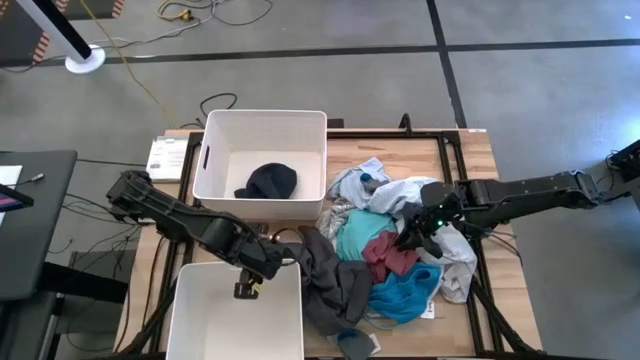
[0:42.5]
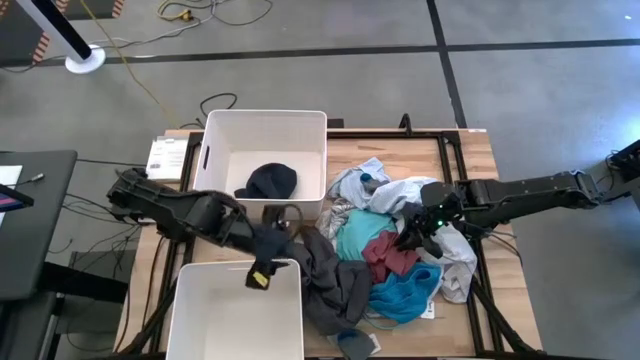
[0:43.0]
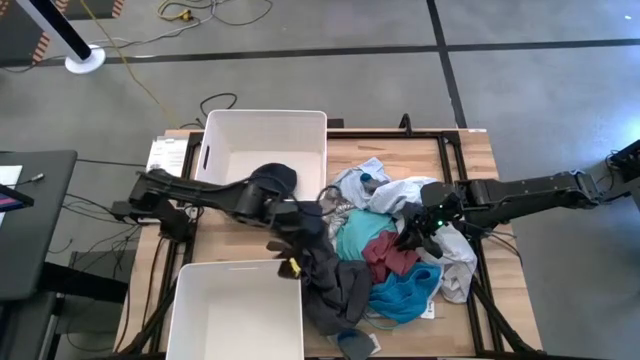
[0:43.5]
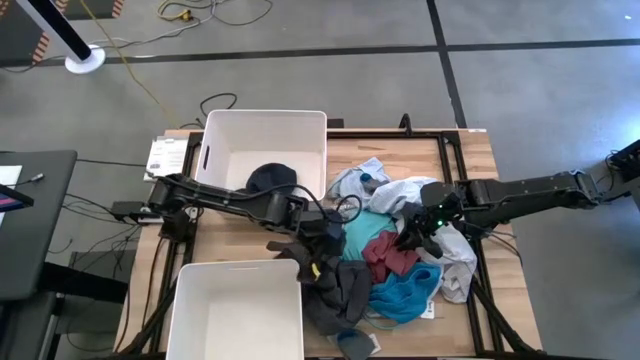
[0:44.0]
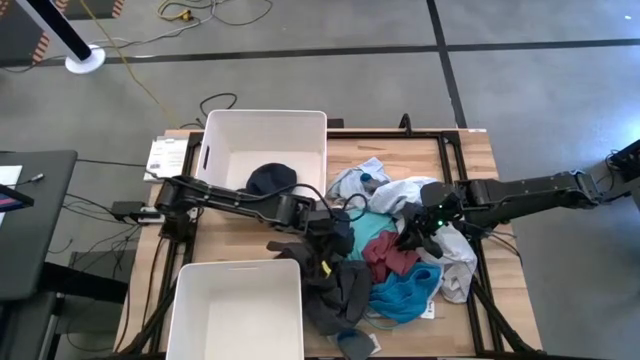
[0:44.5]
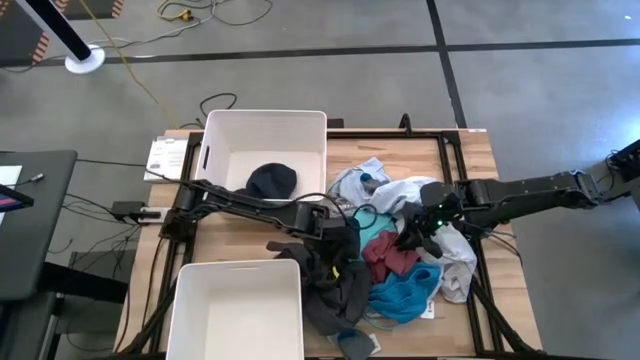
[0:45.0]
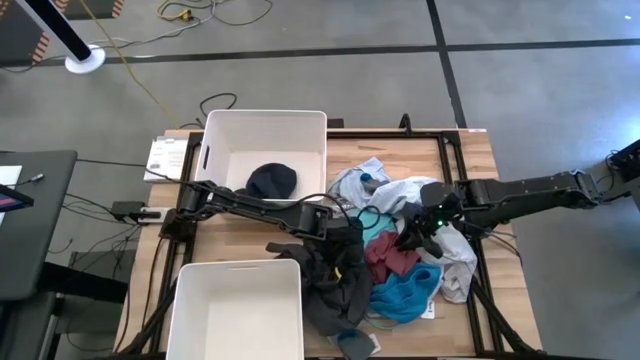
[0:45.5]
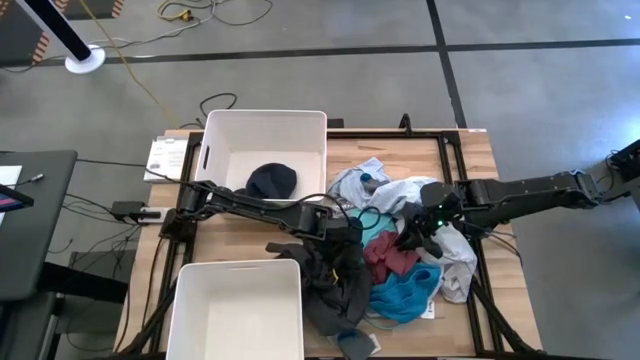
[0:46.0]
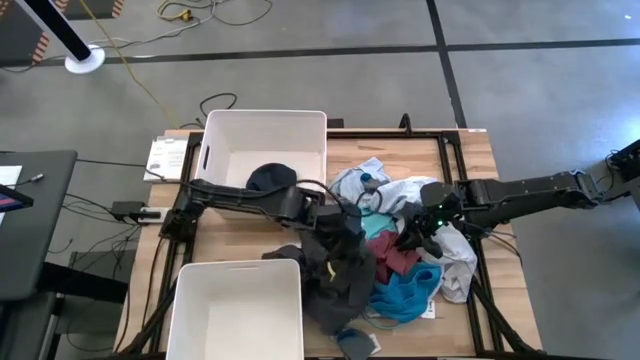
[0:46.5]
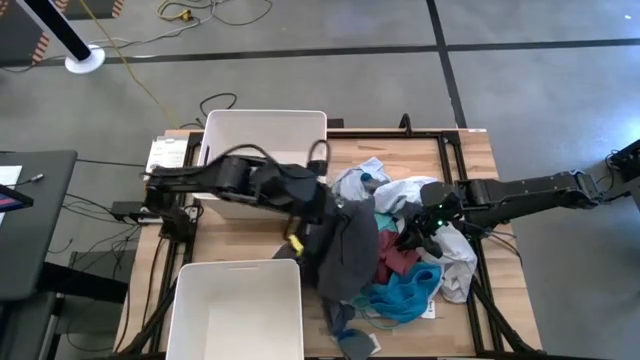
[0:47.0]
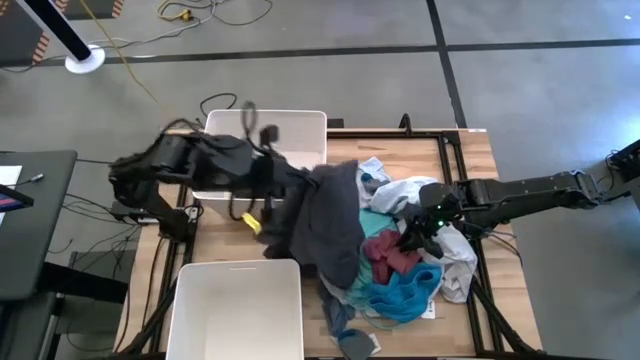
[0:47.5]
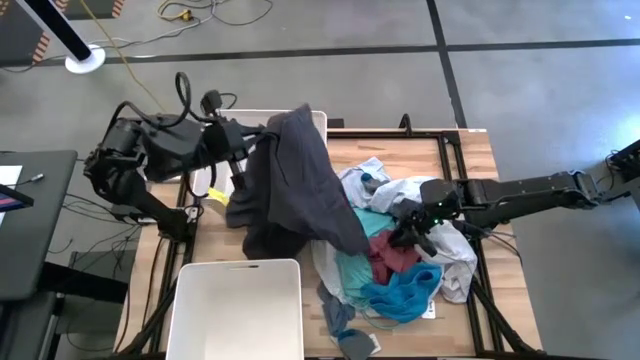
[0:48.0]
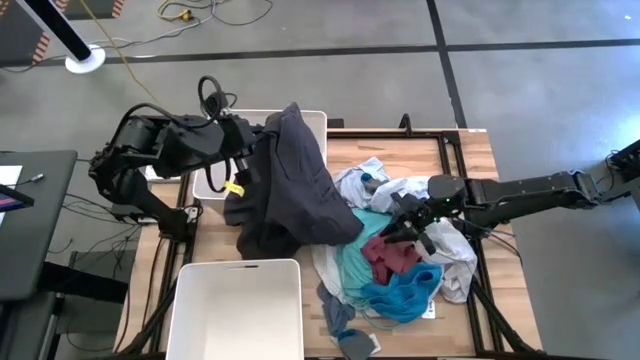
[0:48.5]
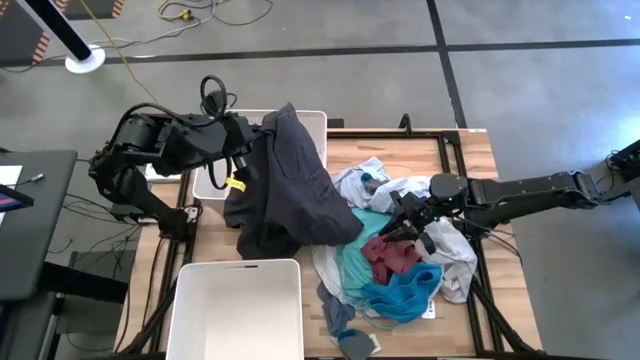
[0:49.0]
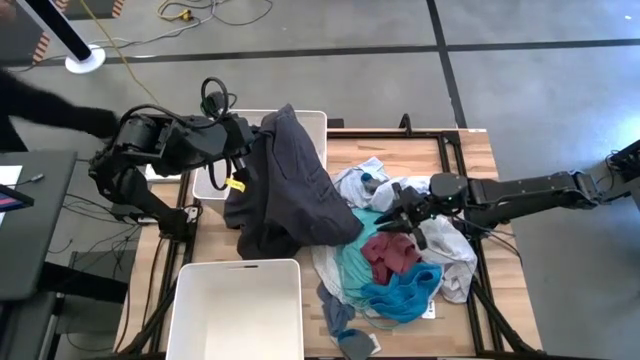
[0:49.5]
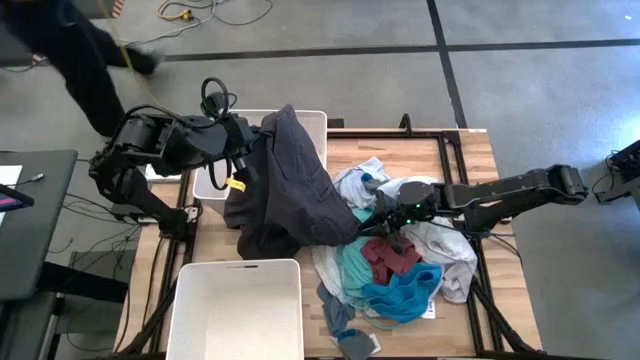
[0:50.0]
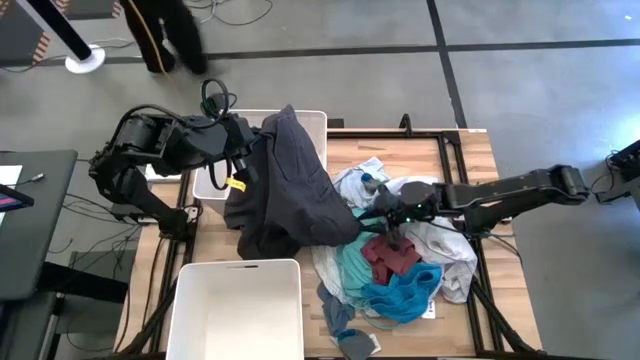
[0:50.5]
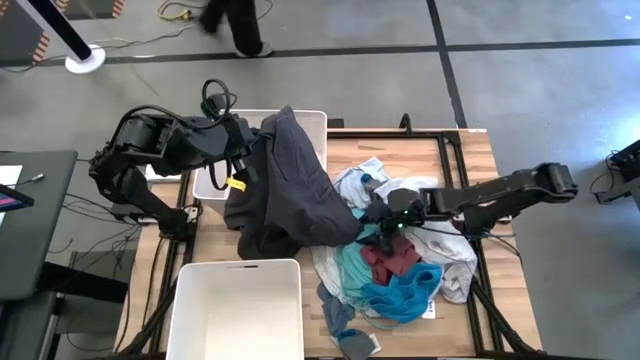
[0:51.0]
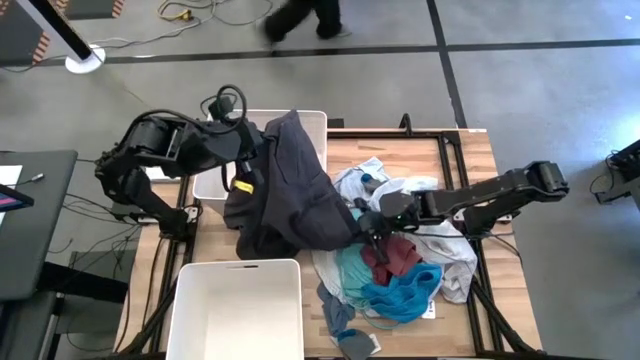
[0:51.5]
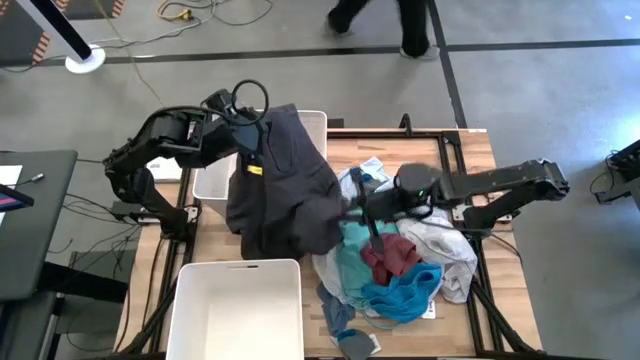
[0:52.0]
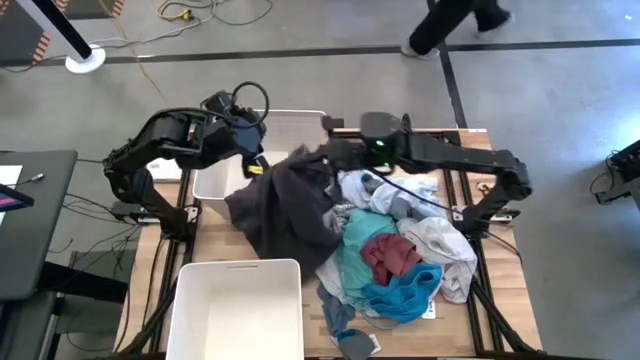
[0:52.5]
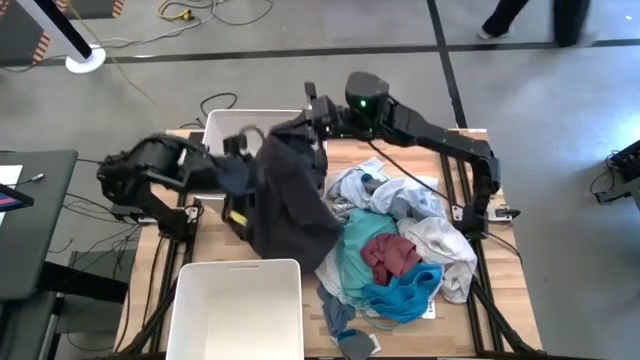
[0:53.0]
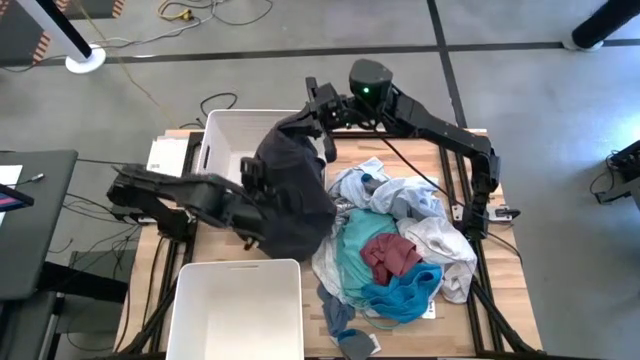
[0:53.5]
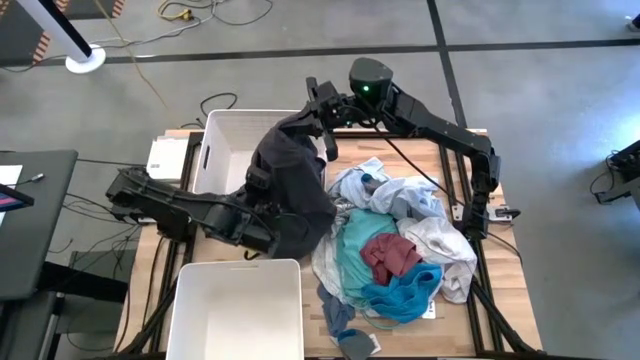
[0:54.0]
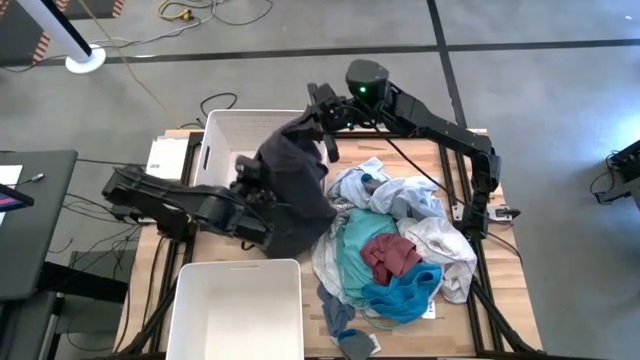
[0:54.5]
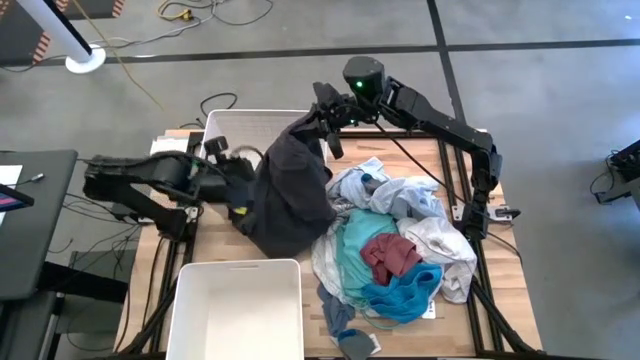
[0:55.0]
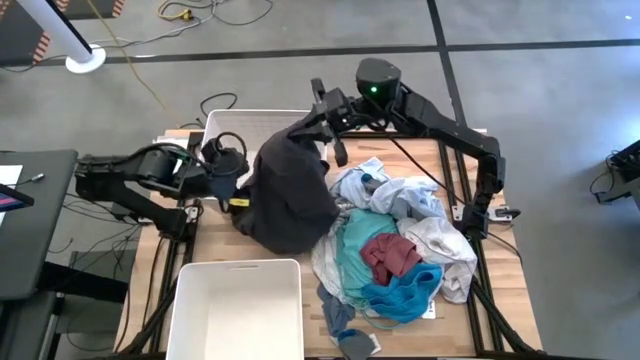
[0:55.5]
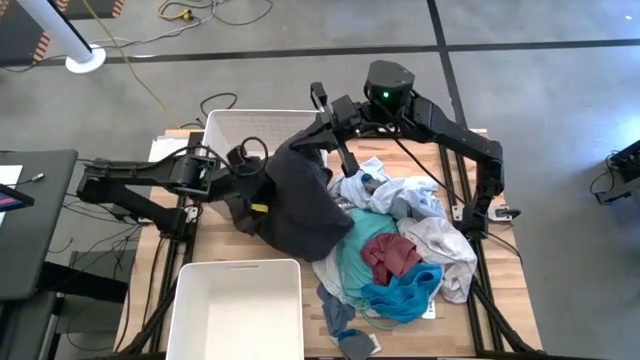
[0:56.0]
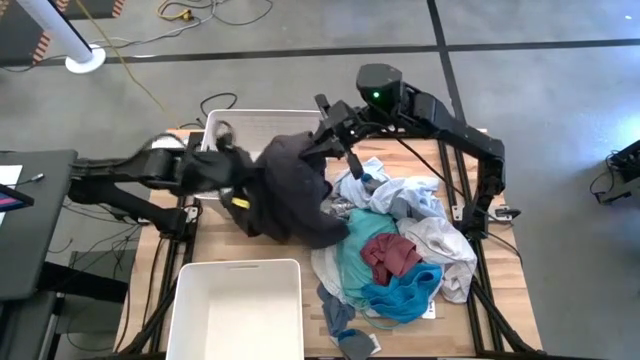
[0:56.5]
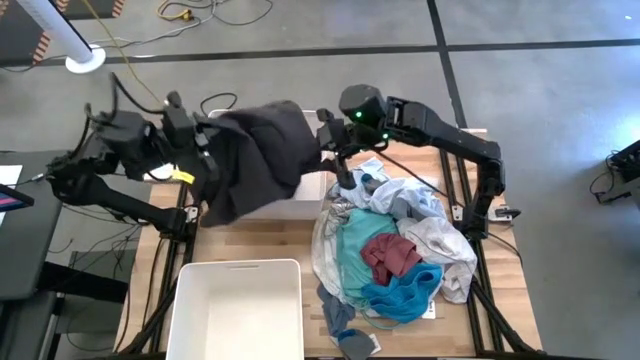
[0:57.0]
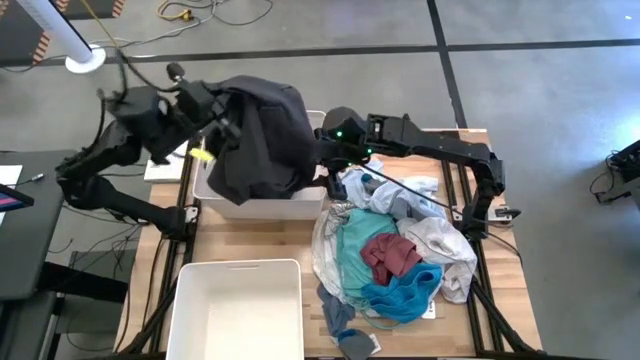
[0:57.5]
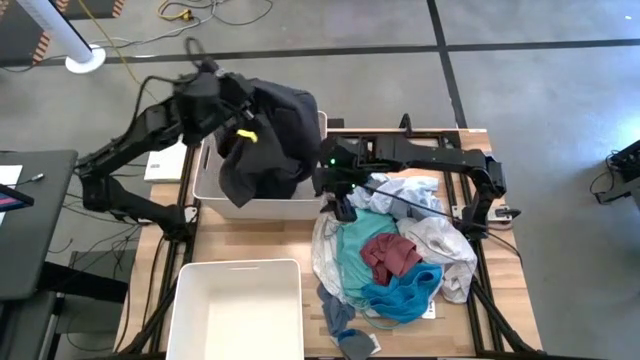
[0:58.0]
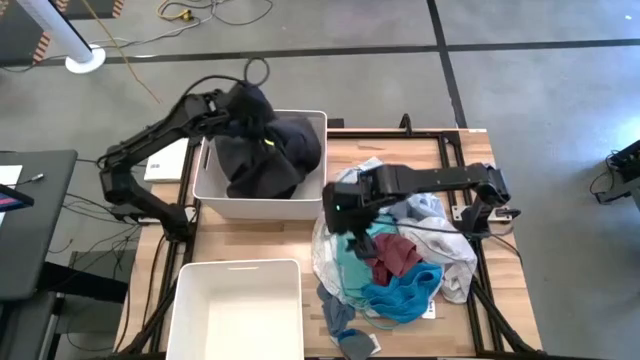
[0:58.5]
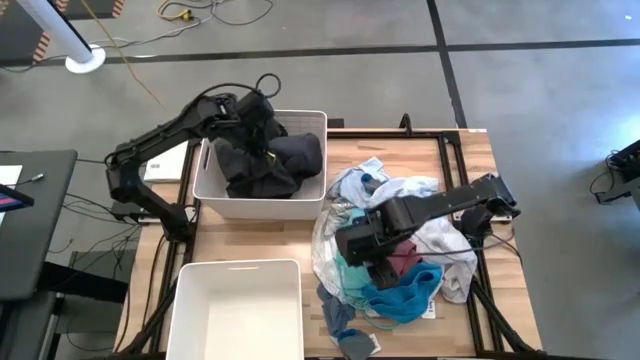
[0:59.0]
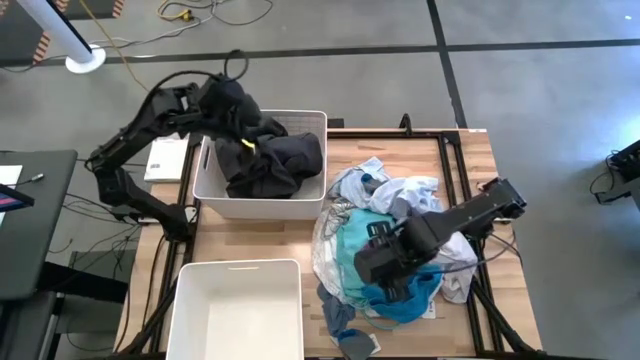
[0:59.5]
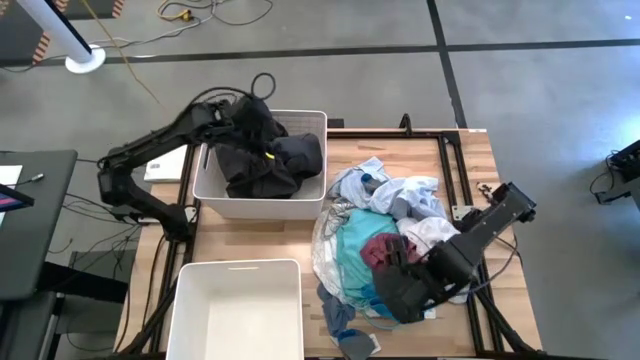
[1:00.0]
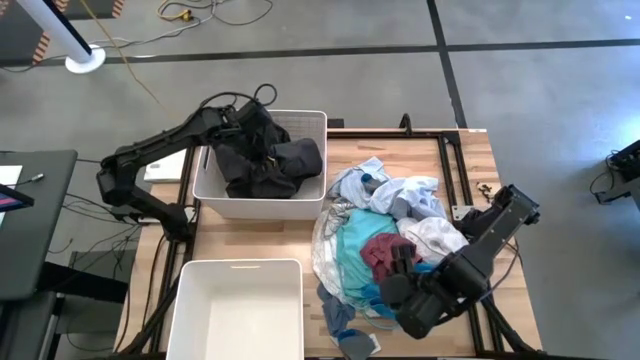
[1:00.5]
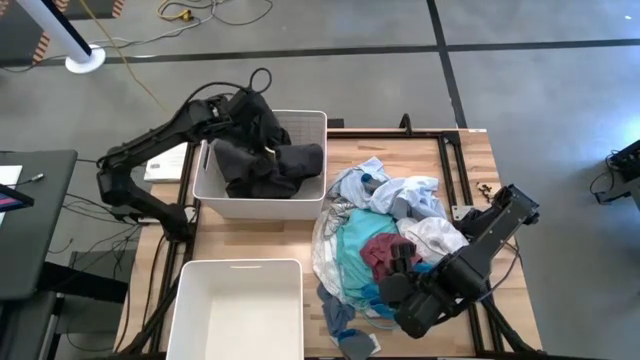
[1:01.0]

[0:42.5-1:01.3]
Task: Sort clothes
Put the black shorts into the top white laundry bin

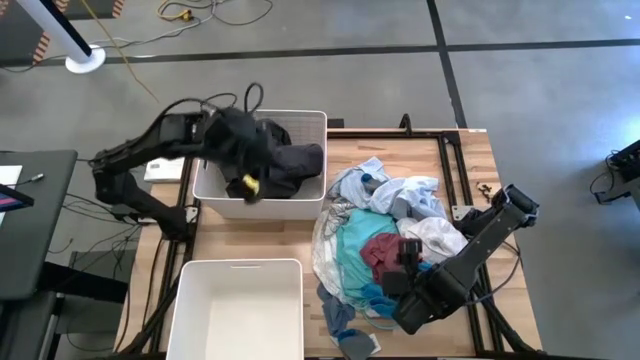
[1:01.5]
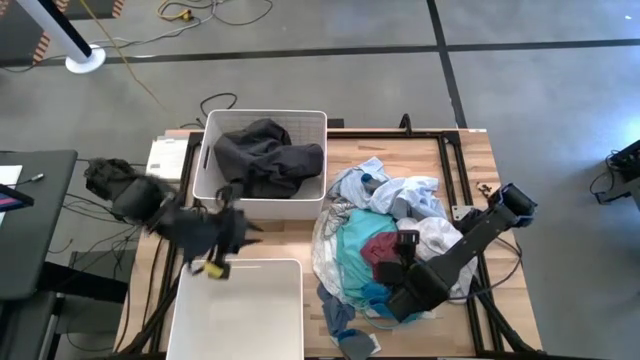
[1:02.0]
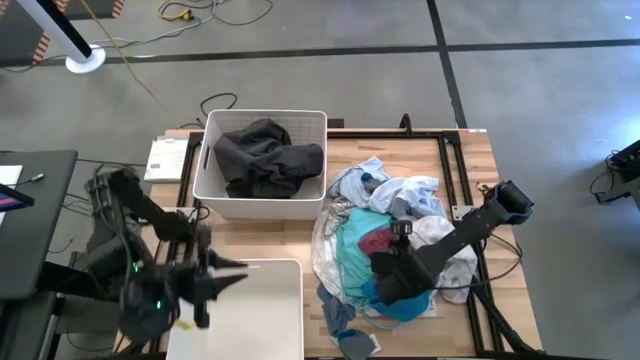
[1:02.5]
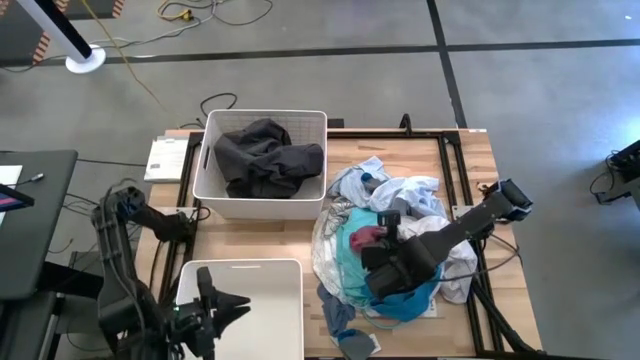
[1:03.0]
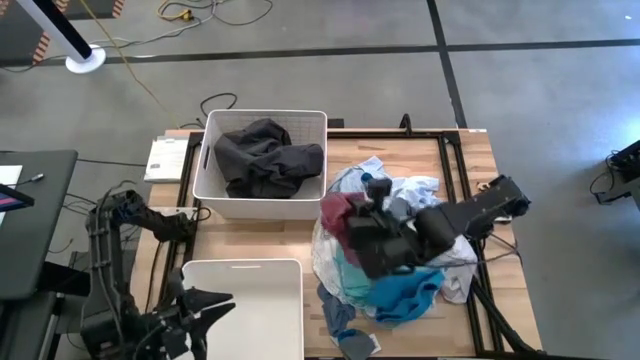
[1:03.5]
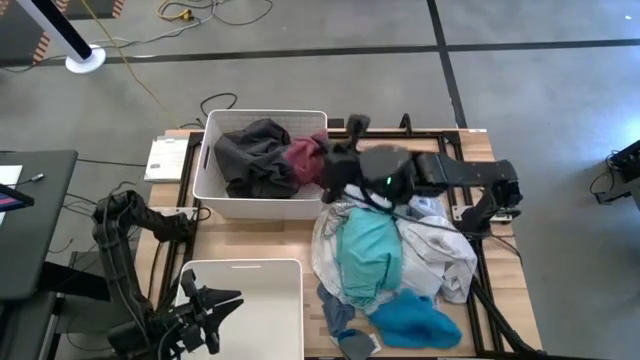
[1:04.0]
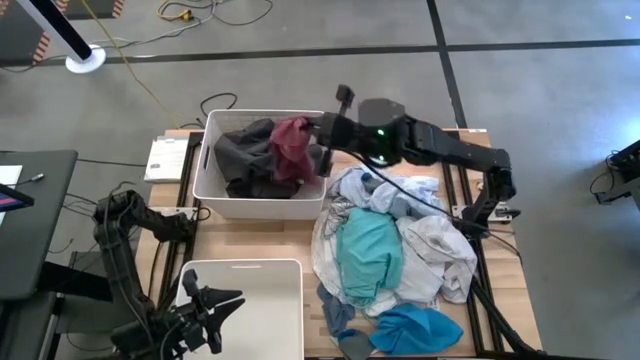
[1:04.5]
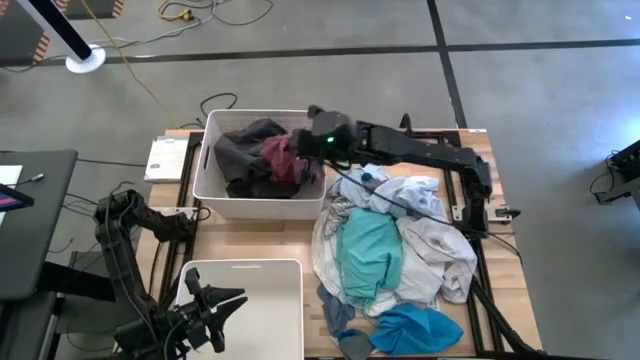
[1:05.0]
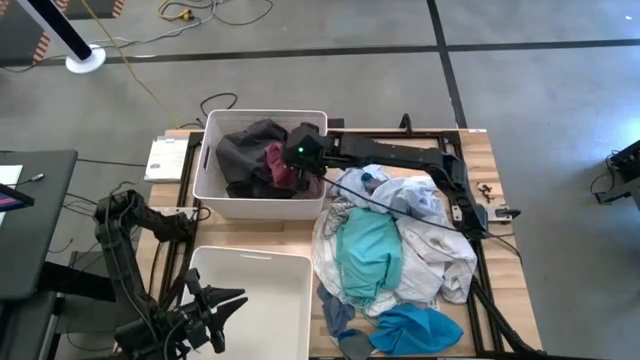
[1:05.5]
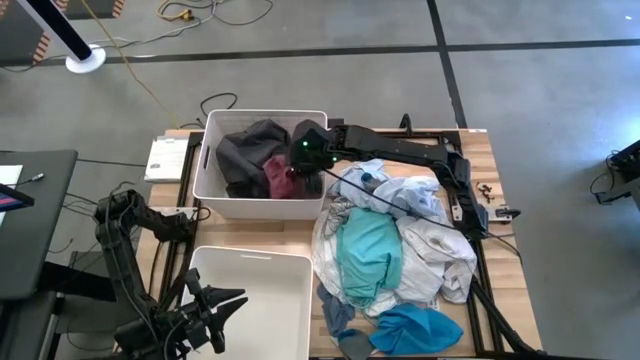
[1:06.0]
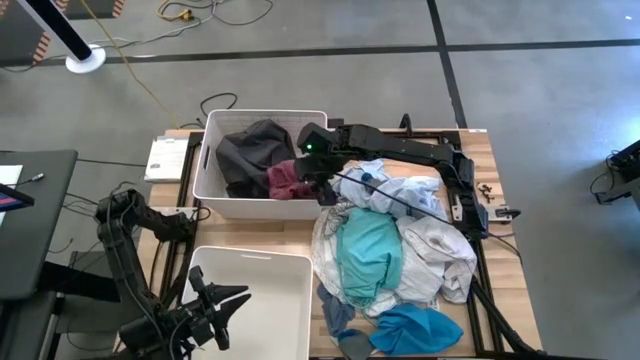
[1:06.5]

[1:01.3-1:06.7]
Put the red cycling shorts into the top white laundry bin
